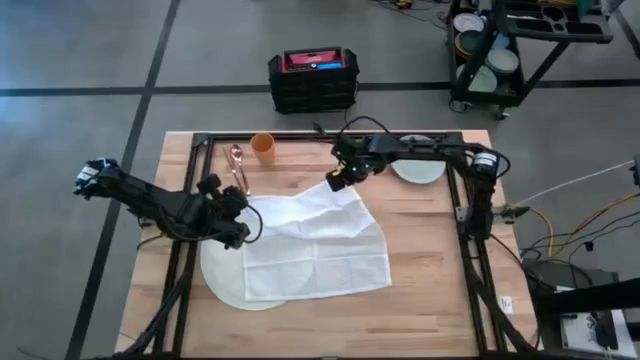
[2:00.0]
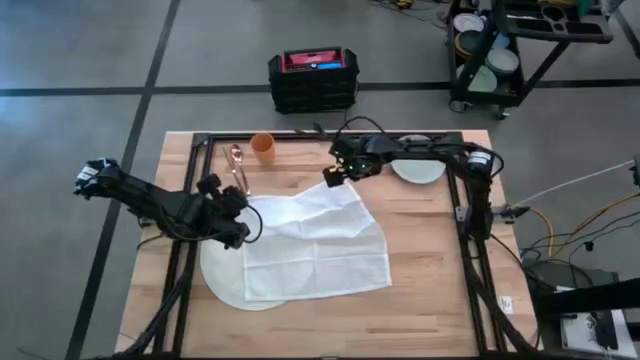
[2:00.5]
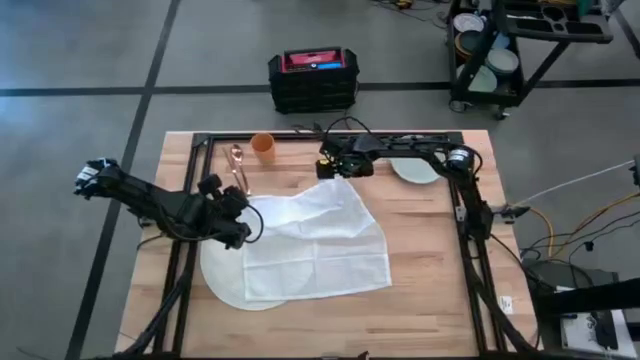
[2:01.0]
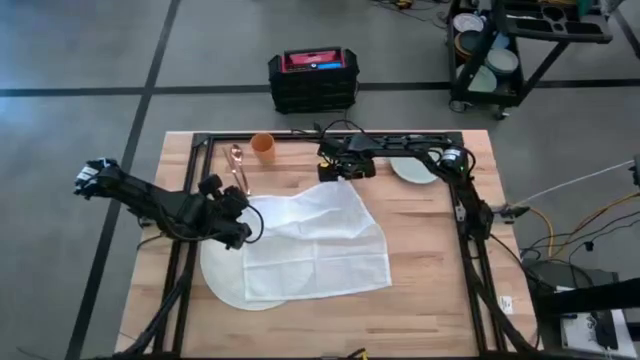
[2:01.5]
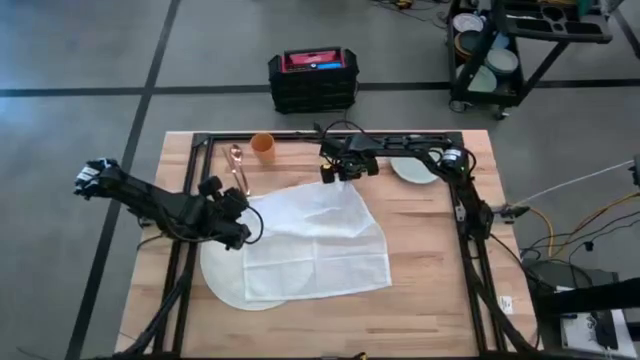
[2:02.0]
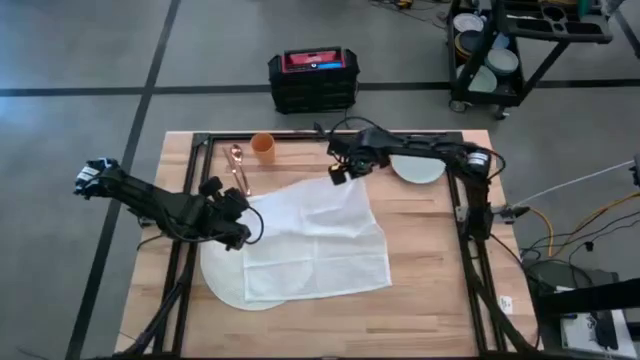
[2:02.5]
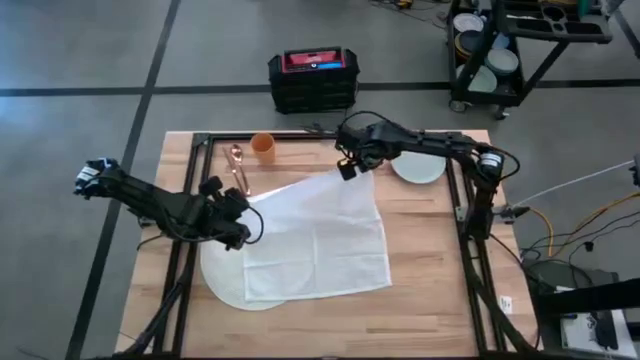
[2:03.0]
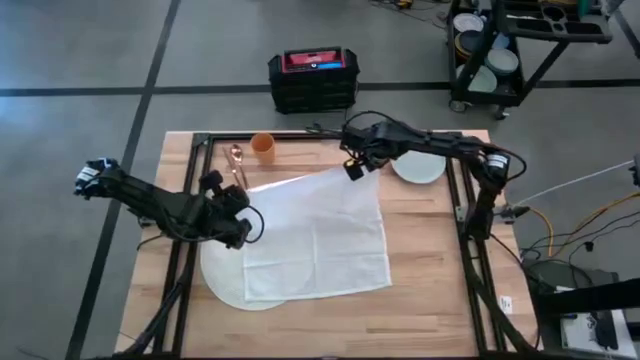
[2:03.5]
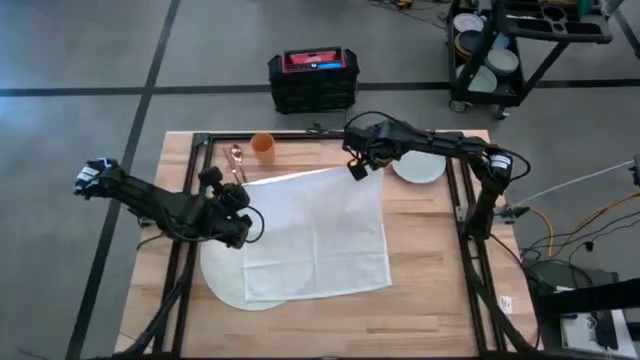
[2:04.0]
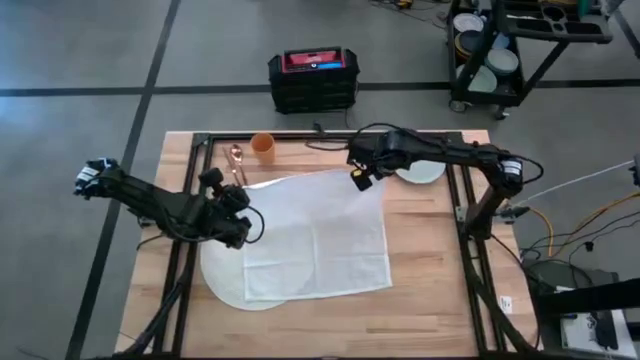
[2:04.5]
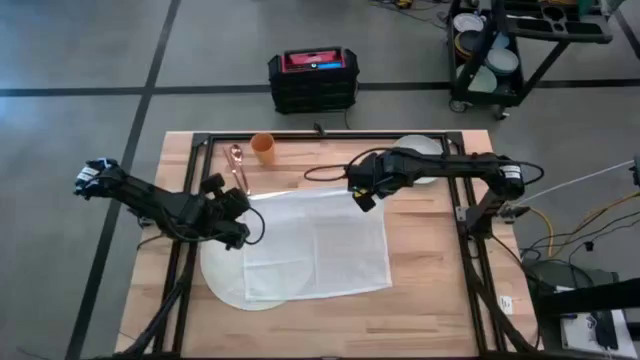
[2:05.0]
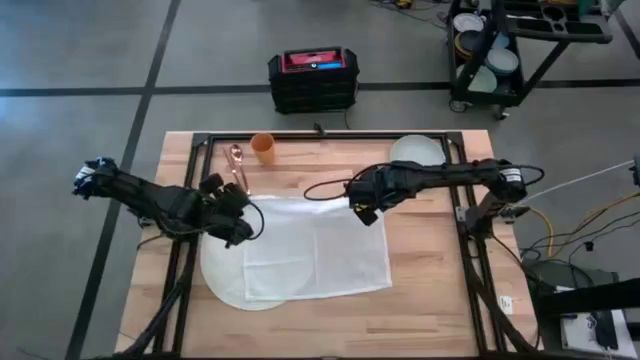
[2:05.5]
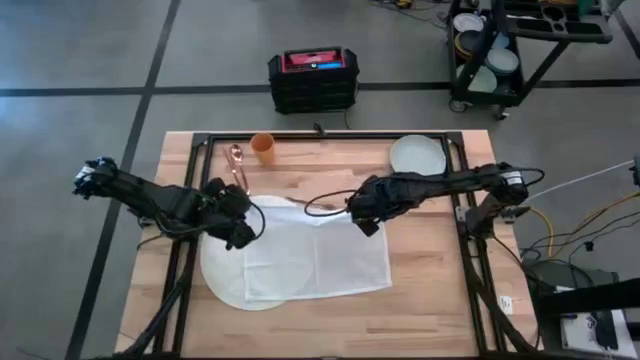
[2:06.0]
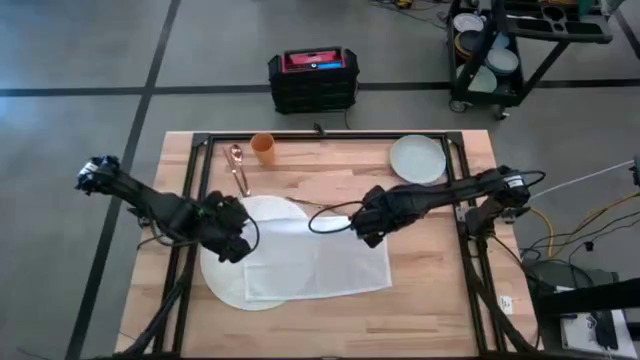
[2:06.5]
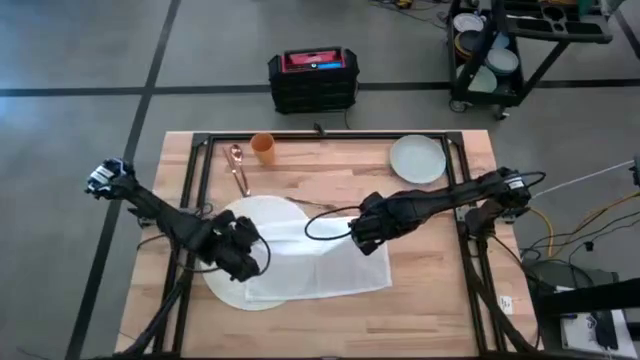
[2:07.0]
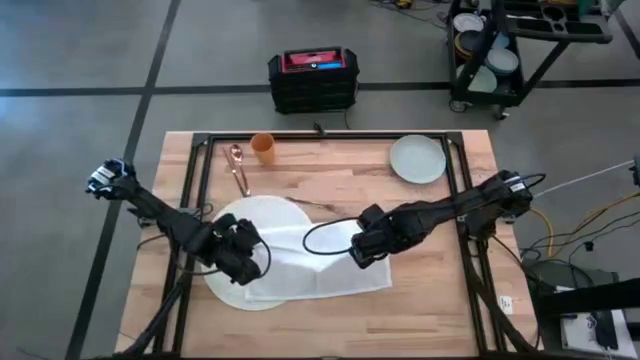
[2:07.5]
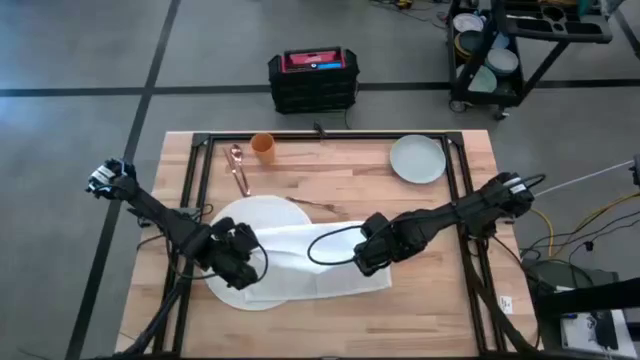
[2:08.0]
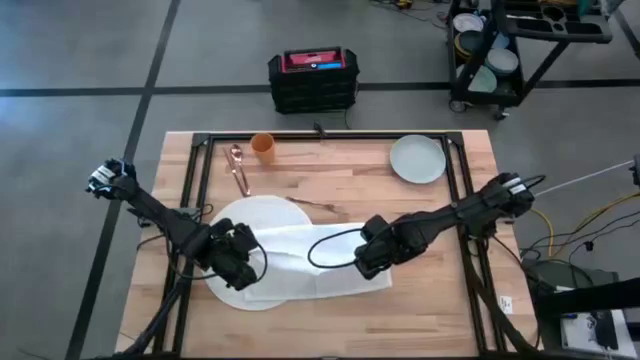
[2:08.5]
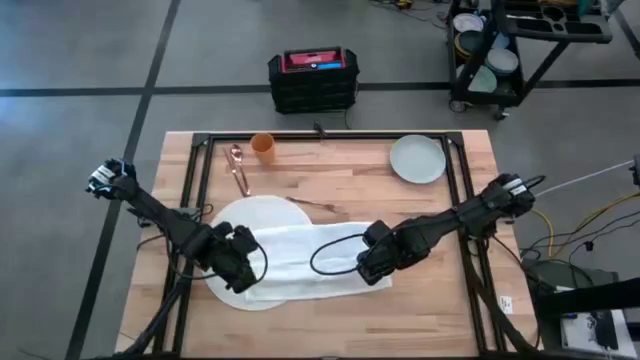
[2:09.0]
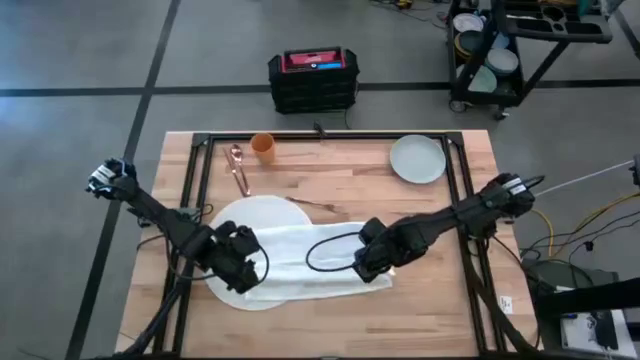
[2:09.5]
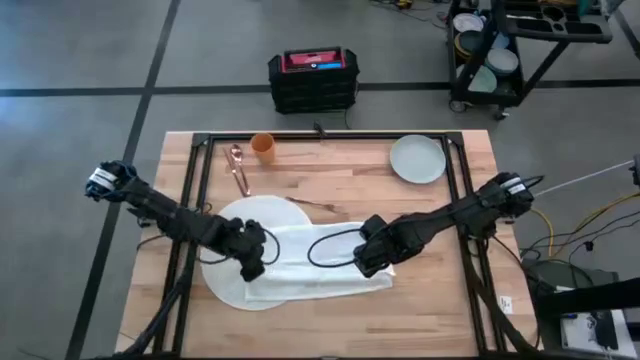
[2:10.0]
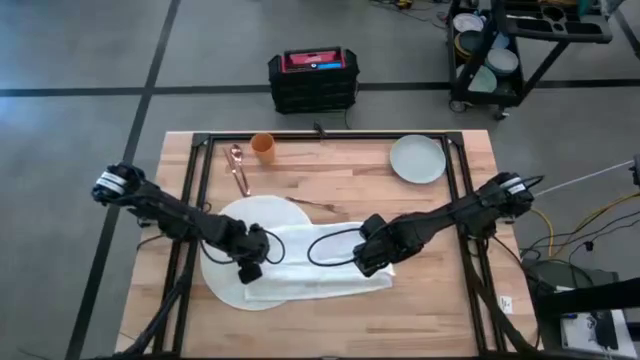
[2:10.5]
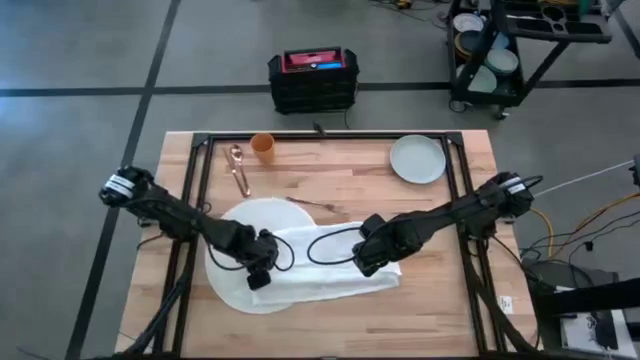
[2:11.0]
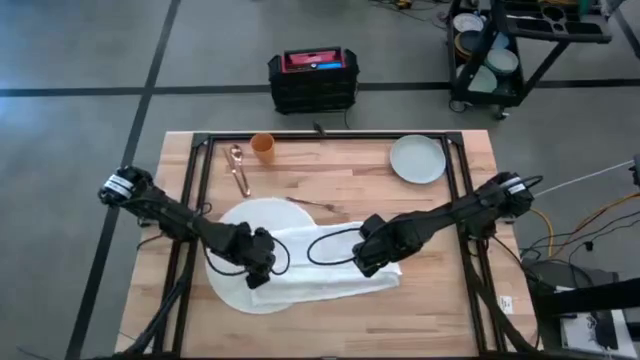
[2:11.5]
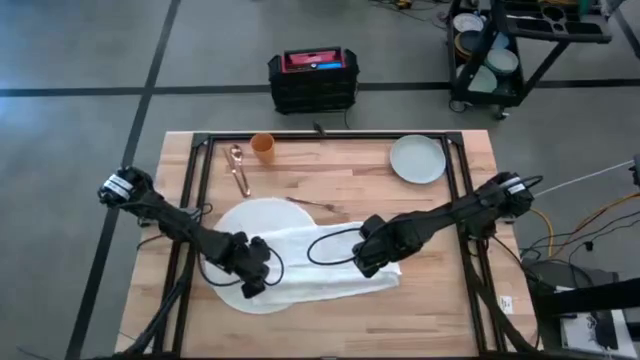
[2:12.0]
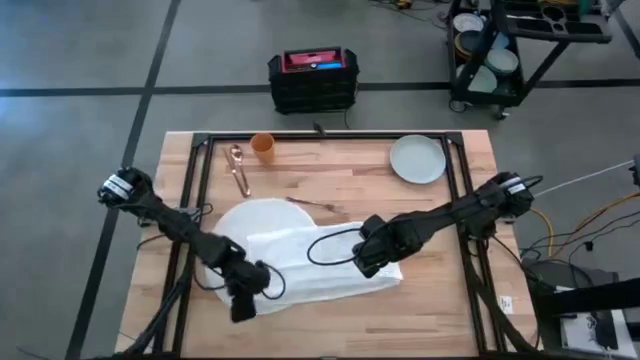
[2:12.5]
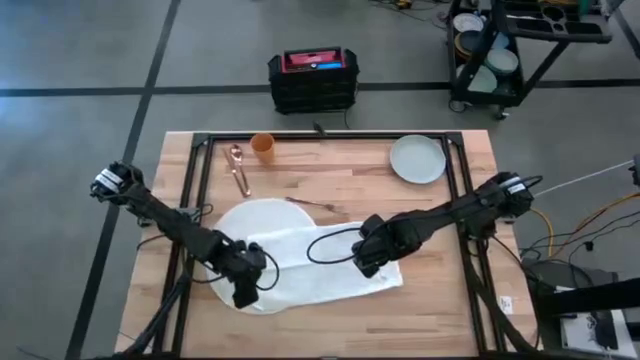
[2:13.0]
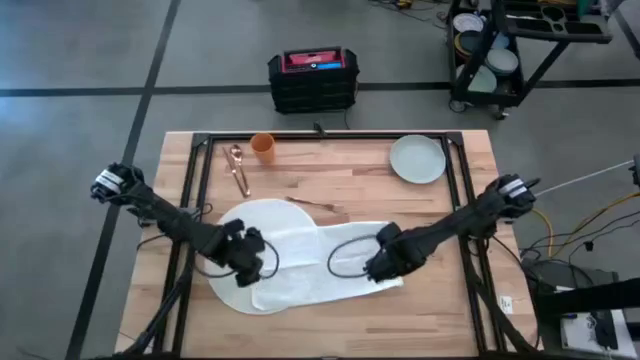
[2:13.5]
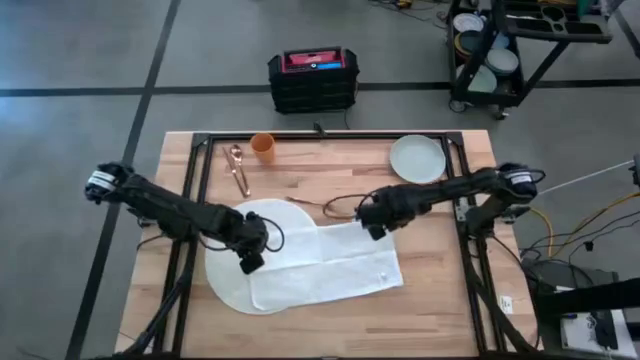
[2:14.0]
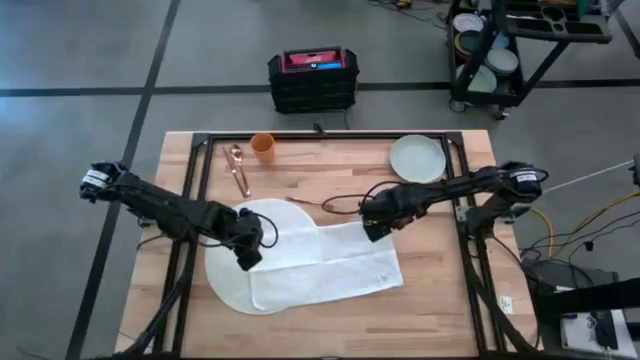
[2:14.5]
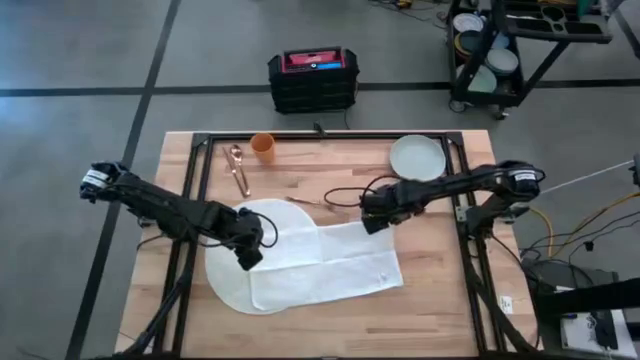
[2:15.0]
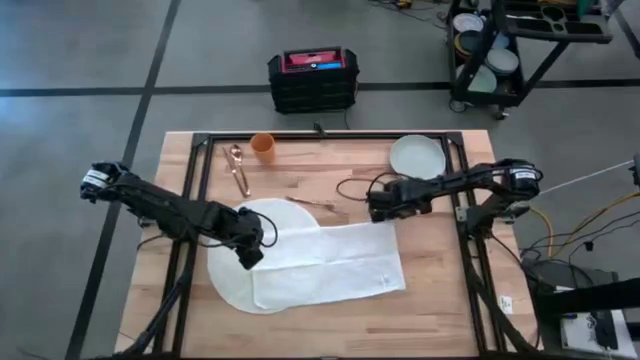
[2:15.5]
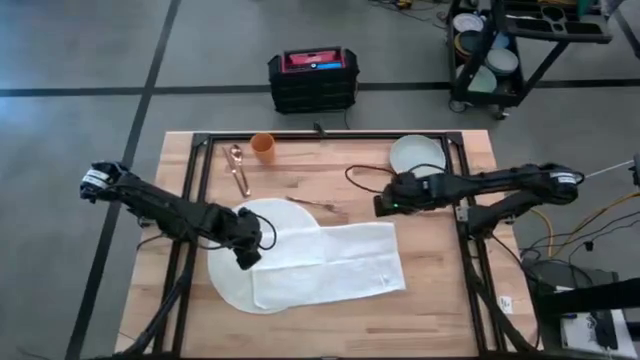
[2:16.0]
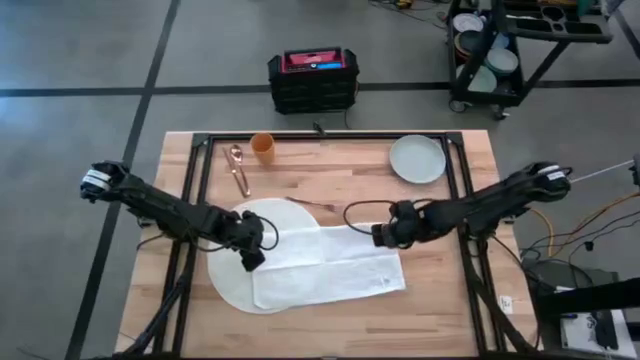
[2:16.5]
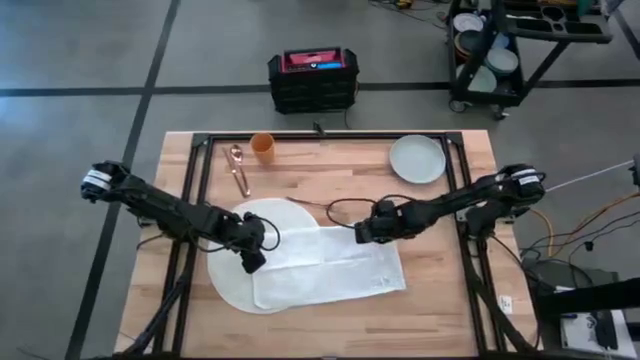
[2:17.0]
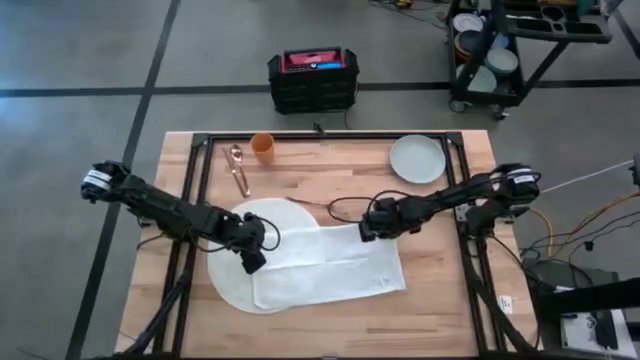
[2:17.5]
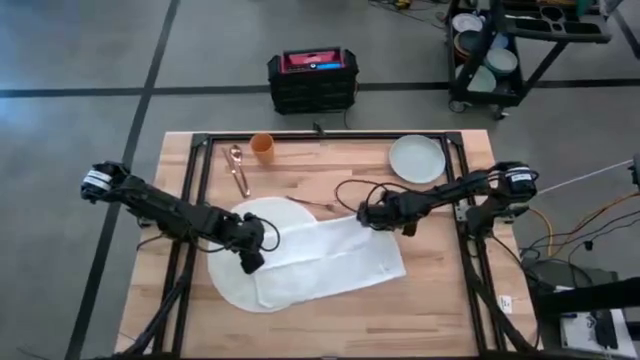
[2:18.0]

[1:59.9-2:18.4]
Task: Set table place
Fold the white napkin

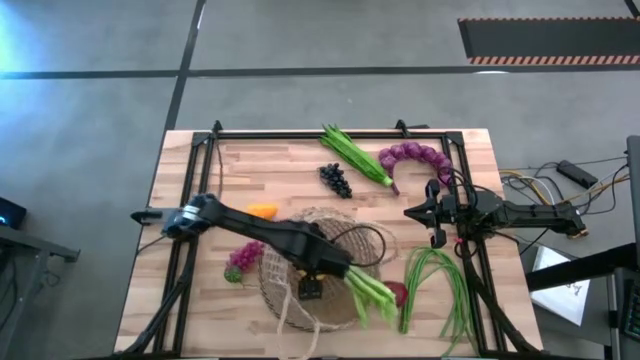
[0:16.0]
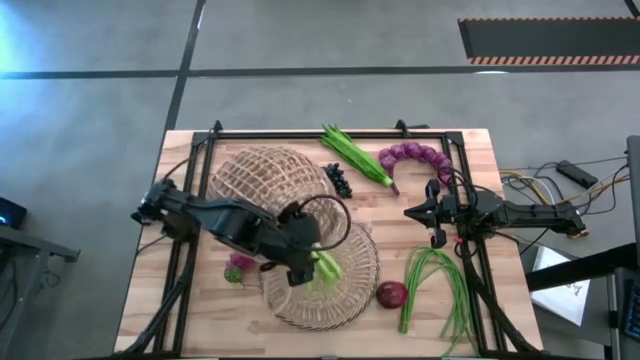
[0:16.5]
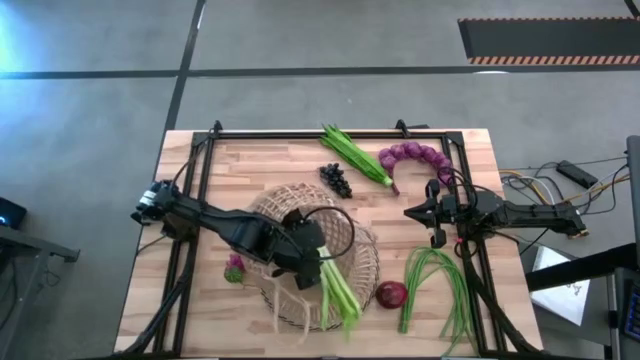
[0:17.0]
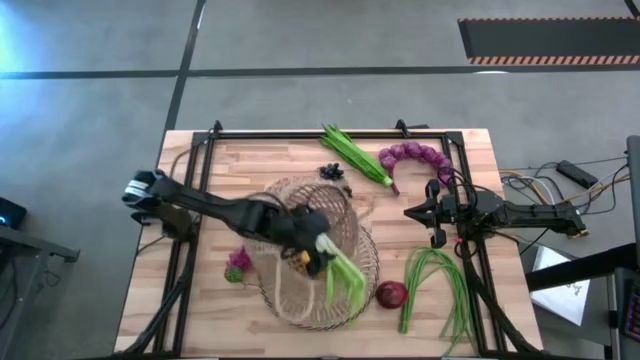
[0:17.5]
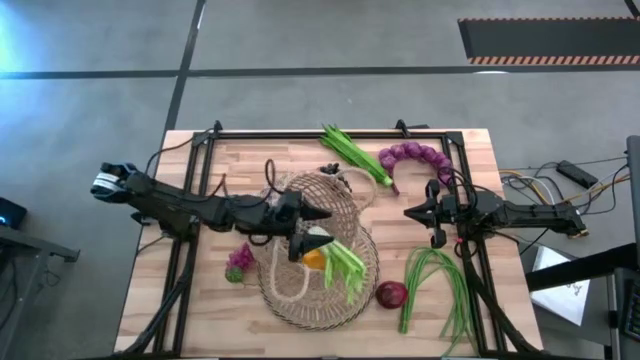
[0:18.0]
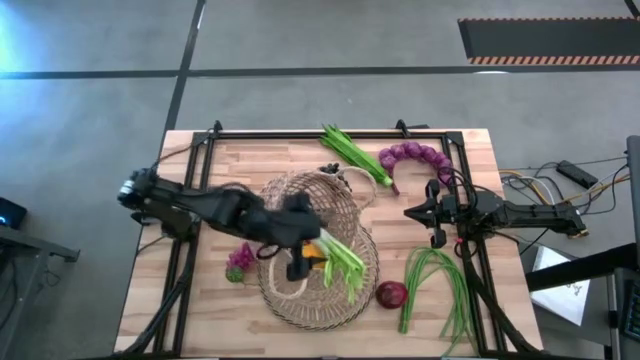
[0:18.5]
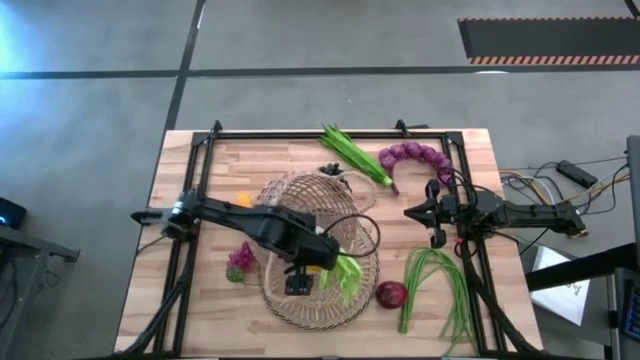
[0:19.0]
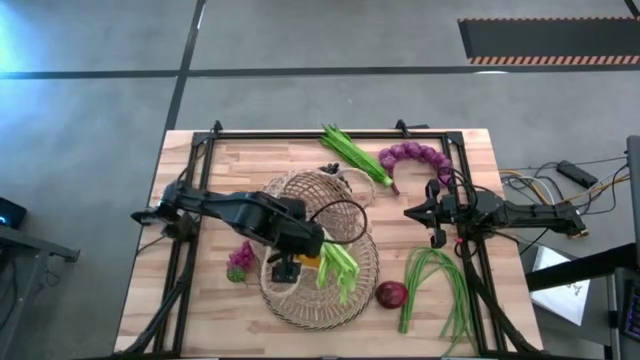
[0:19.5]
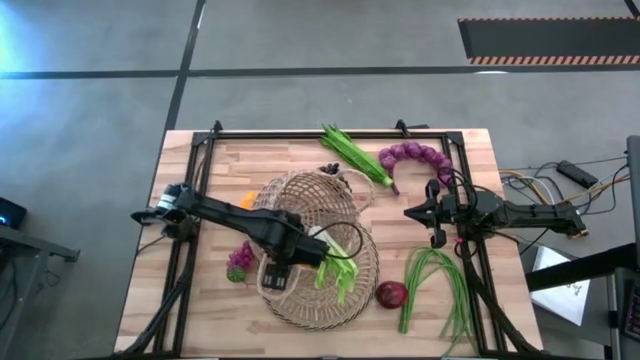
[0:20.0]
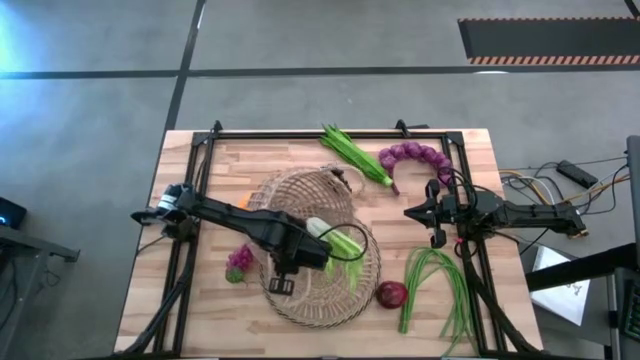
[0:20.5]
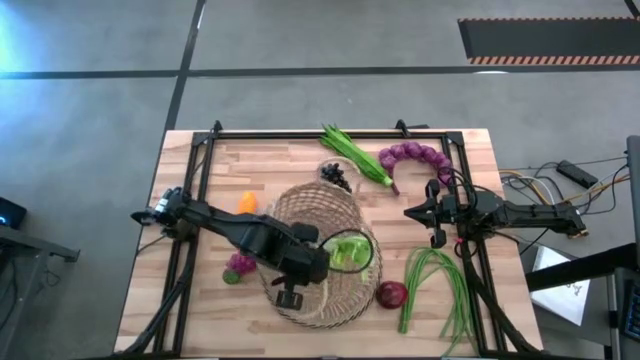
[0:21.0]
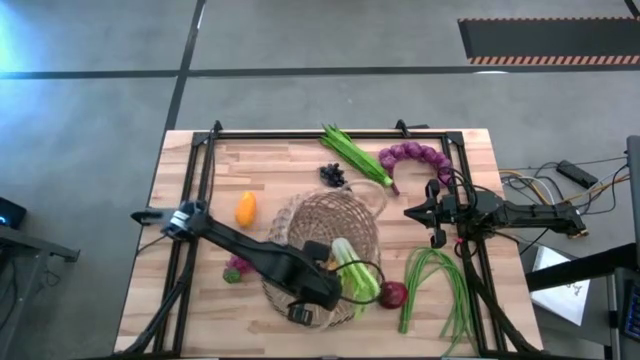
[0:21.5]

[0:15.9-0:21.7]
Task: Build produce basket
Adjust the basket
